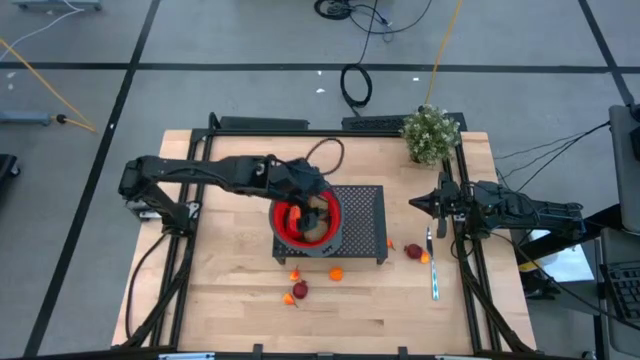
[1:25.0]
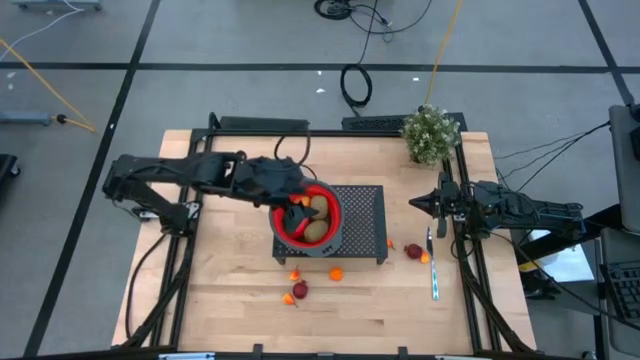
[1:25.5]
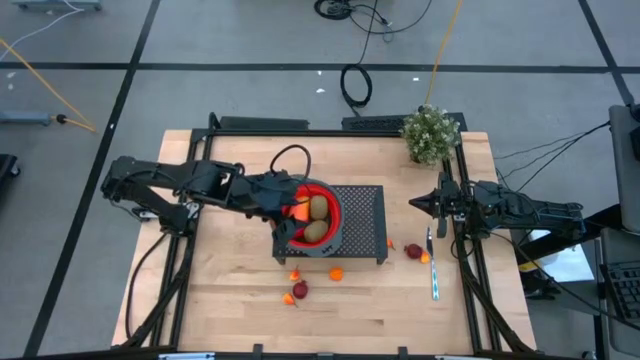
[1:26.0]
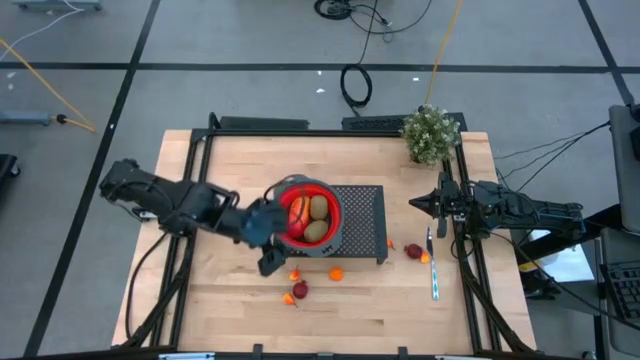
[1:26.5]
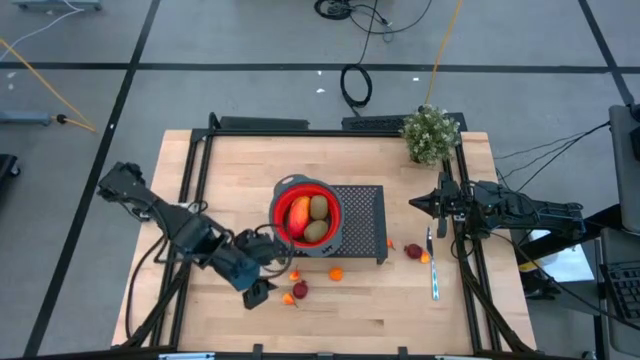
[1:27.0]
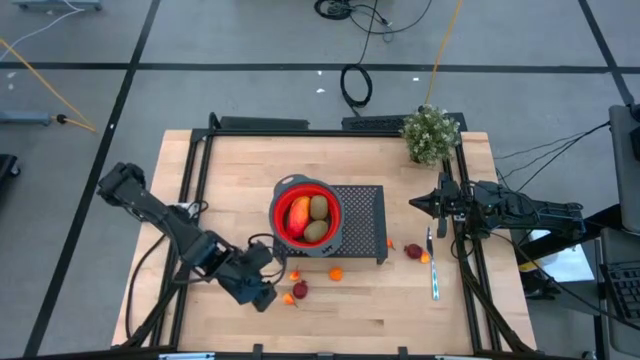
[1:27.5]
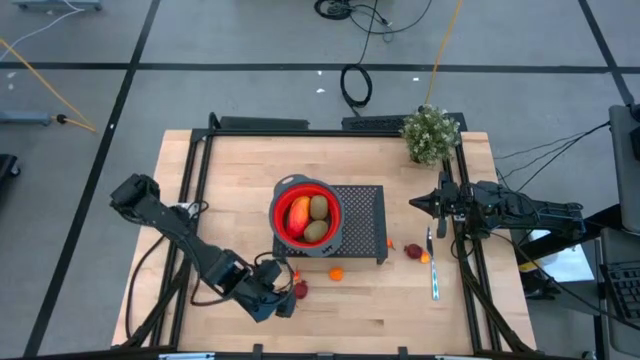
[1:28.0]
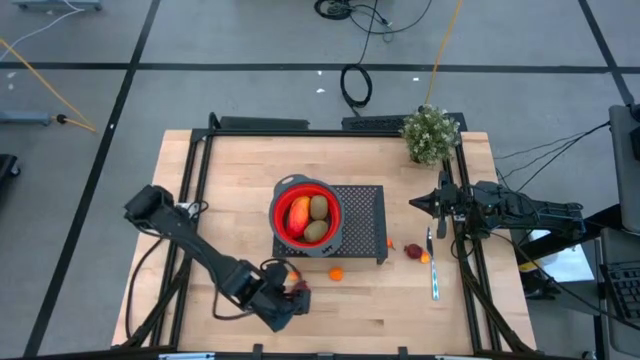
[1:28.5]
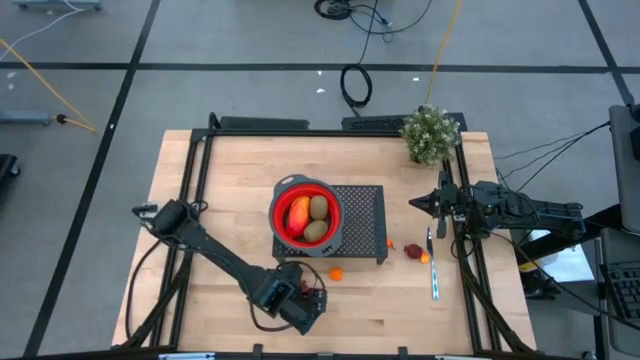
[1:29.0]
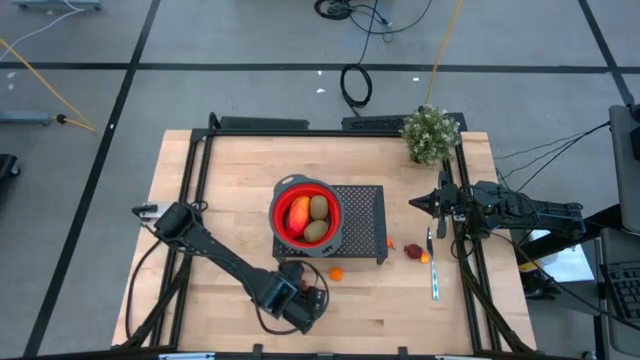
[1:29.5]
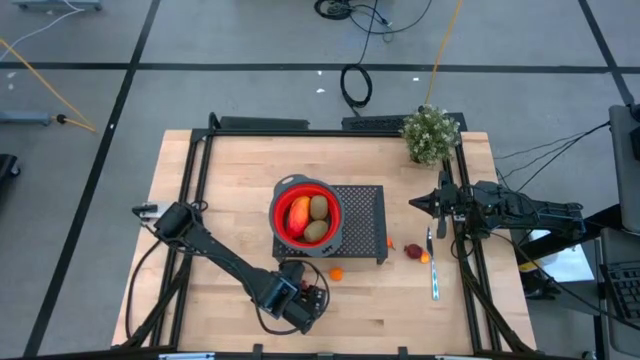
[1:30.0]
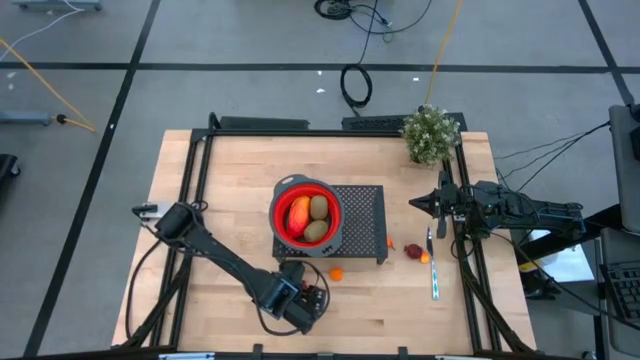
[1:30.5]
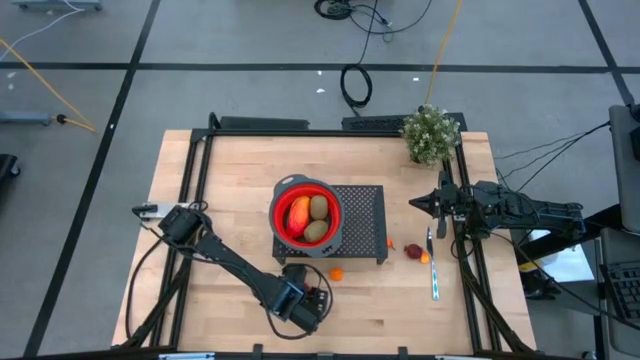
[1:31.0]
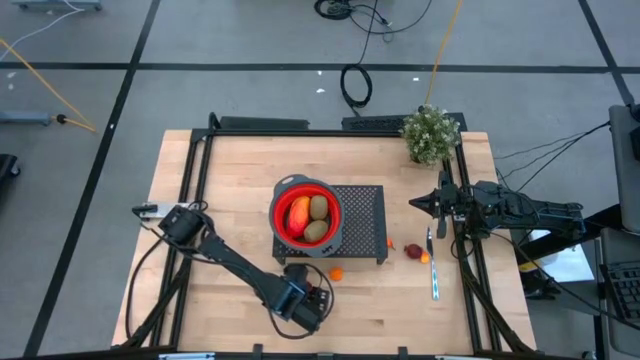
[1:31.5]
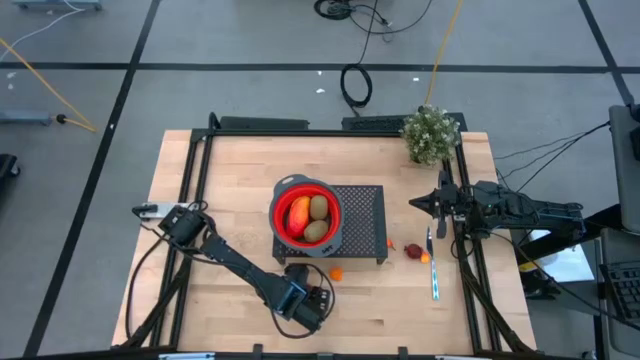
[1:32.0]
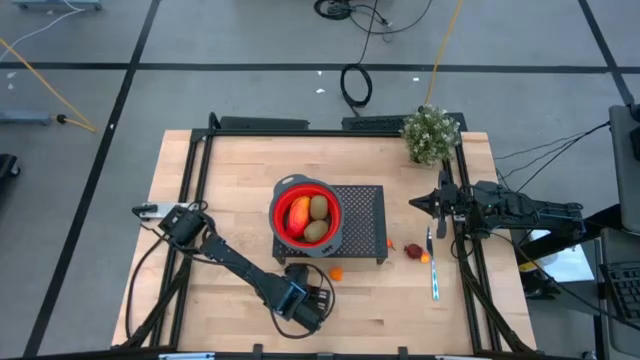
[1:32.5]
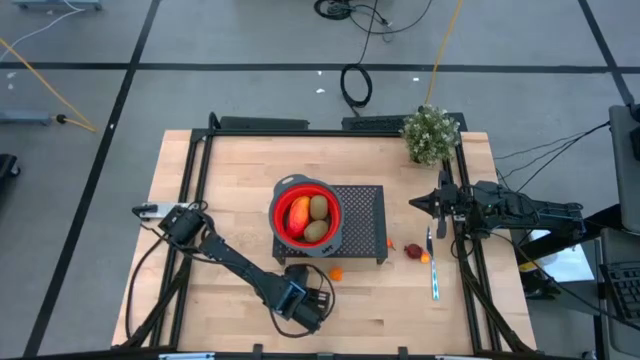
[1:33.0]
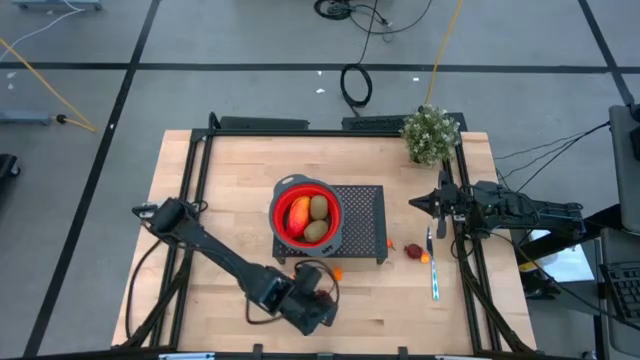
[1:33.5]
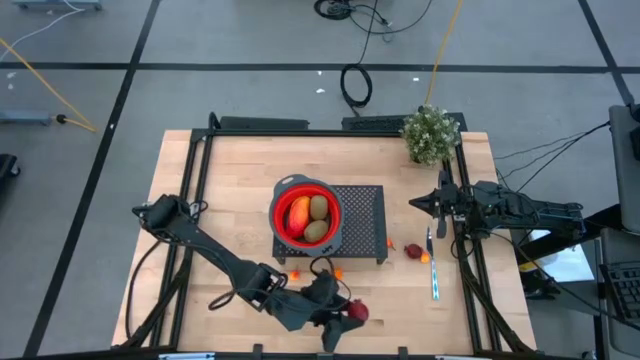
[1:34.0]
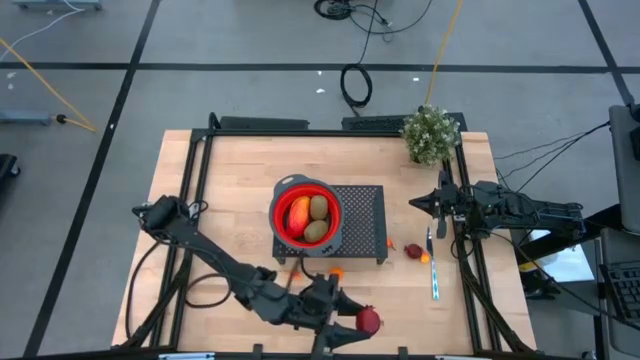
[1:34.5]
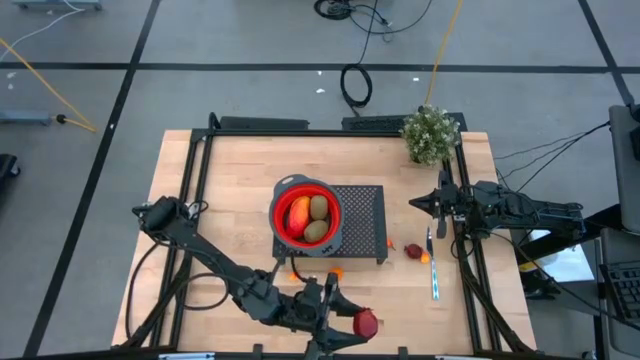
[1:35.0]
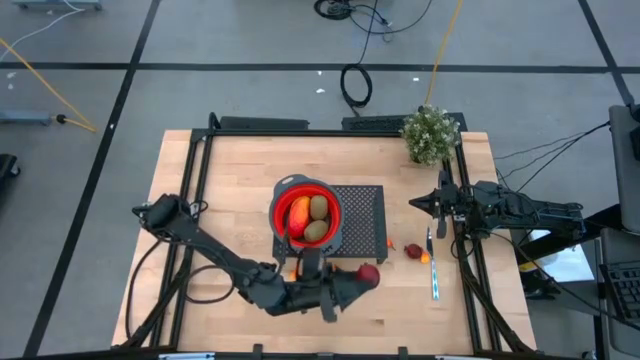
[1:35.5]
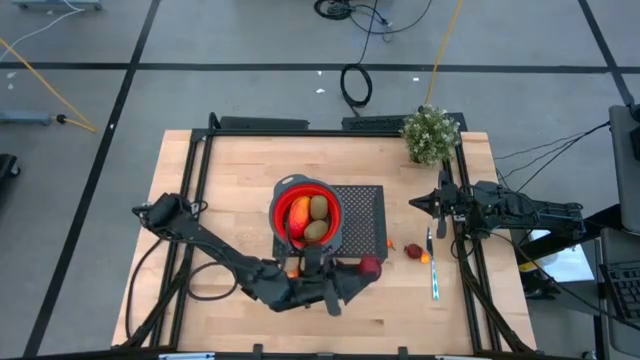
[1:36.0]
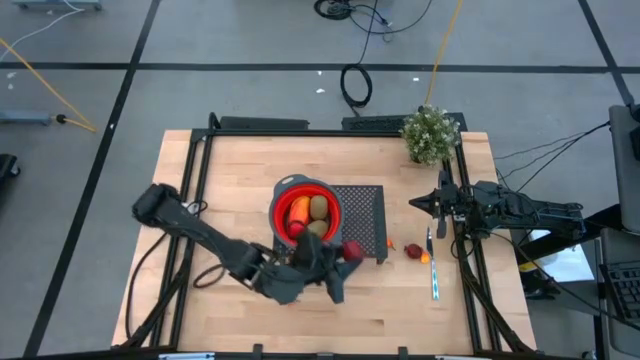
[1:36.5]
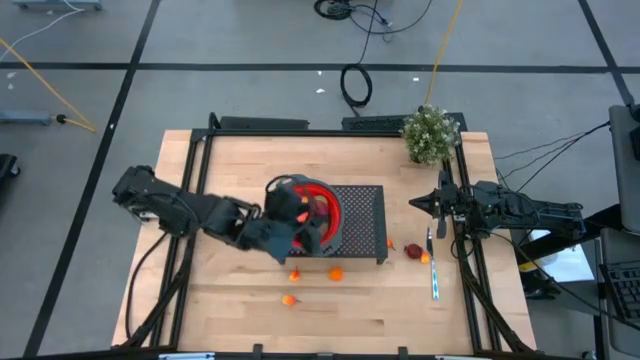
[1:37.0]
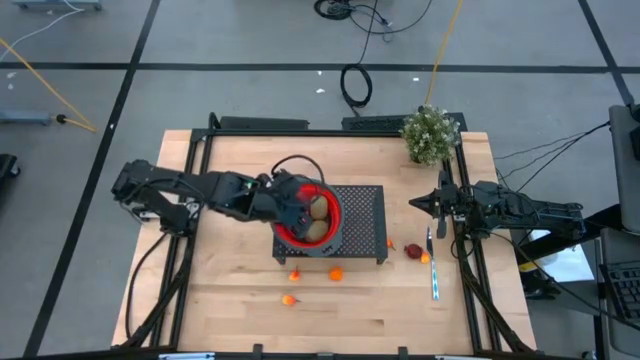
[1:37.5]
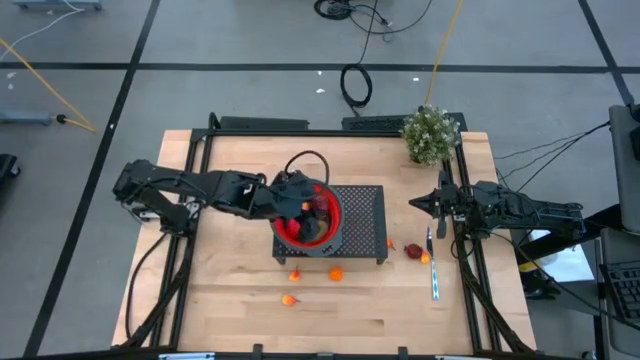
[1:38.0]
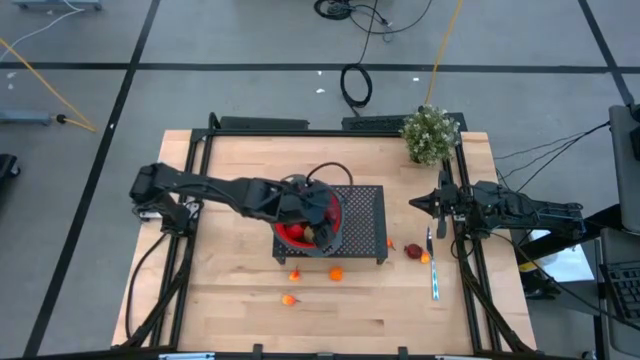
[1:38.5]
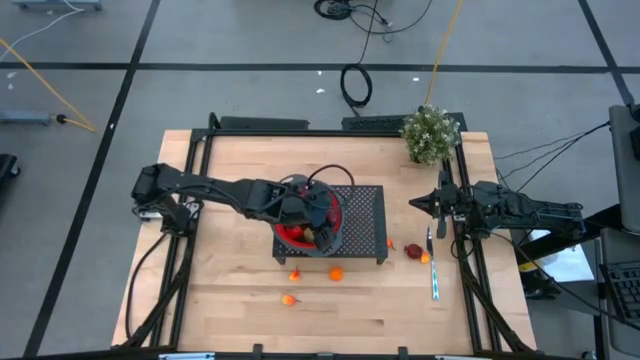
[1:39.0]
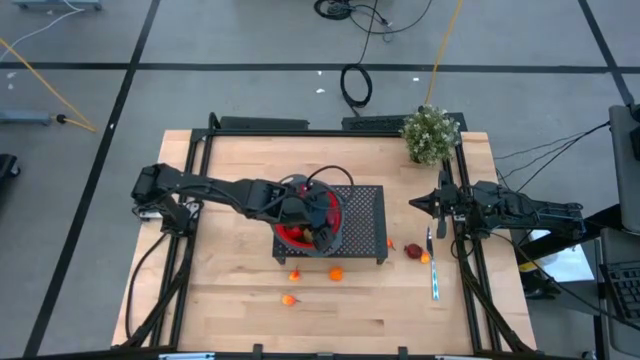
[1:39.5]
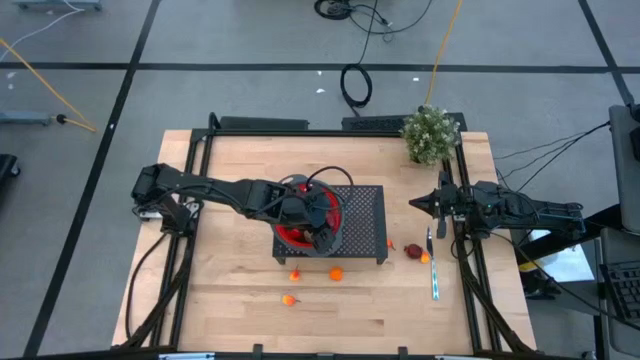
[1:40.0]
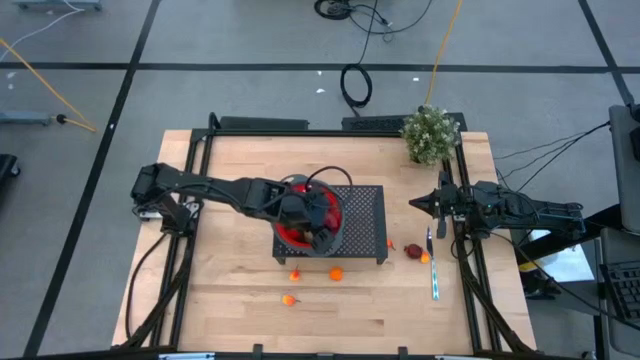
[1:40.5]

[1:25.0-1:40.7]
Task: Pick & Place Fruit
Put the pomegranate into the red colander on the shelf

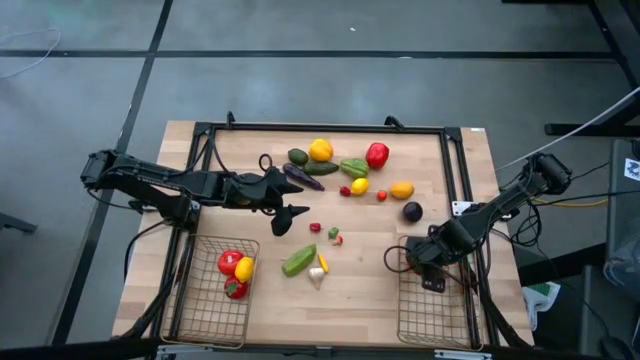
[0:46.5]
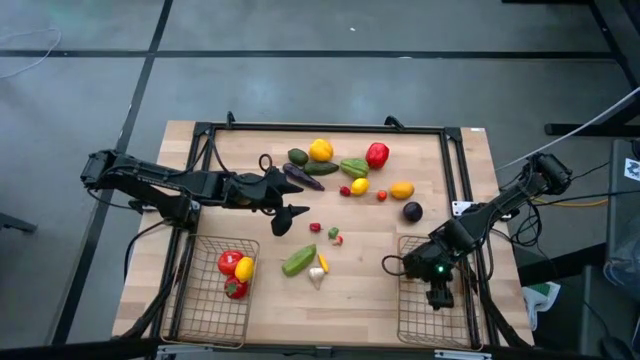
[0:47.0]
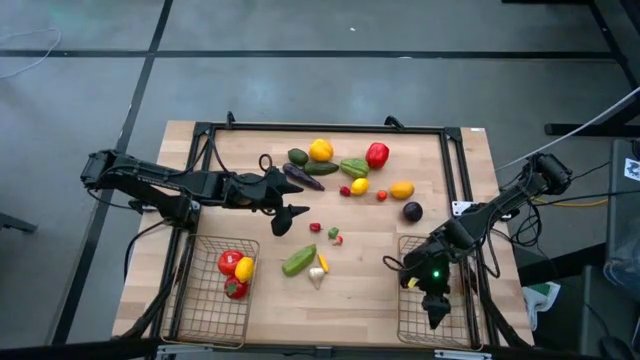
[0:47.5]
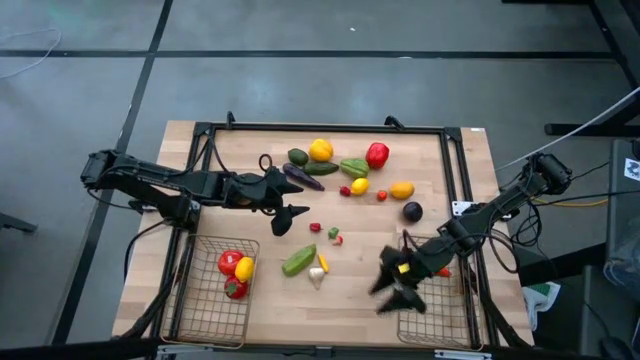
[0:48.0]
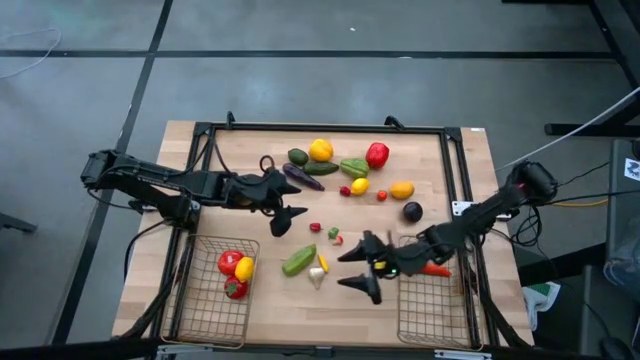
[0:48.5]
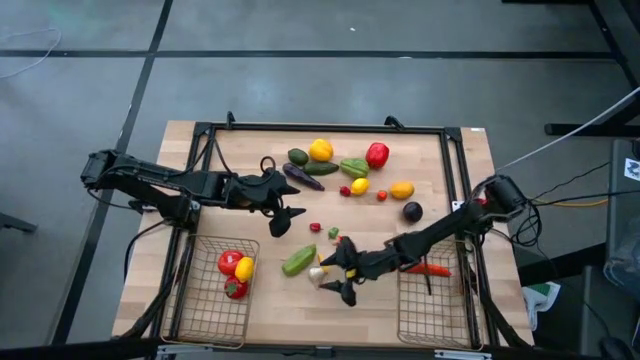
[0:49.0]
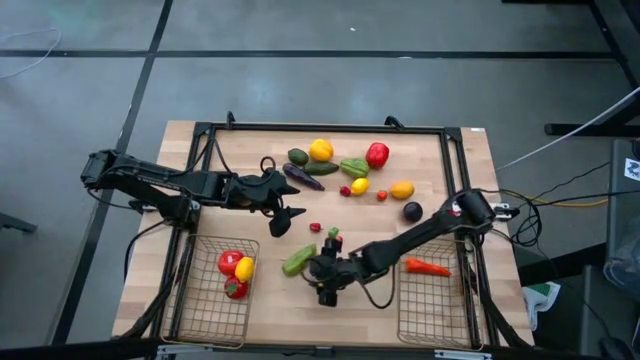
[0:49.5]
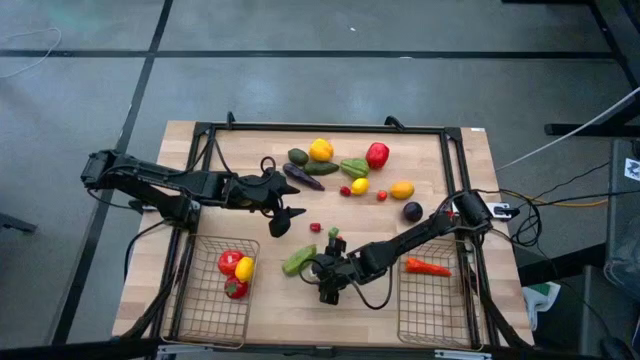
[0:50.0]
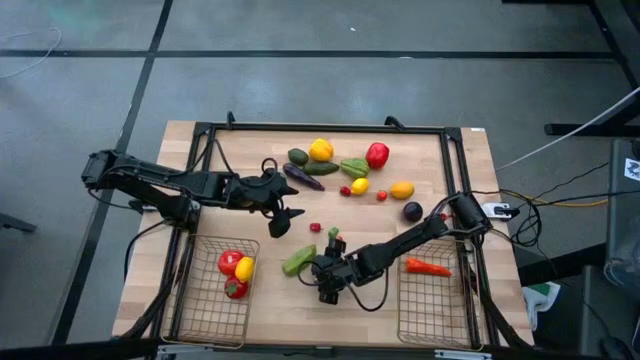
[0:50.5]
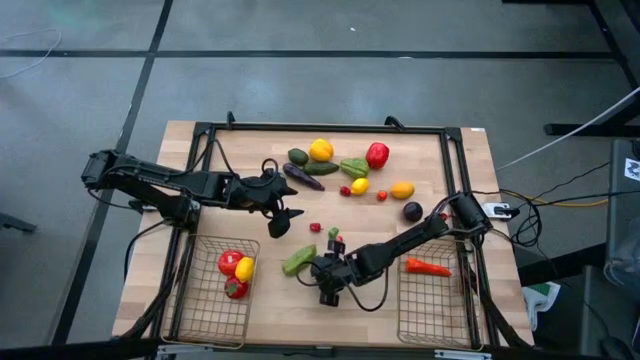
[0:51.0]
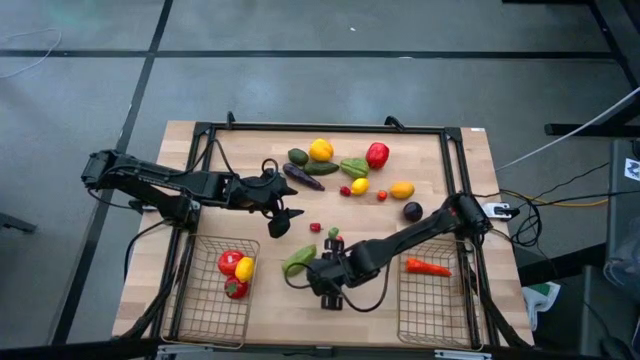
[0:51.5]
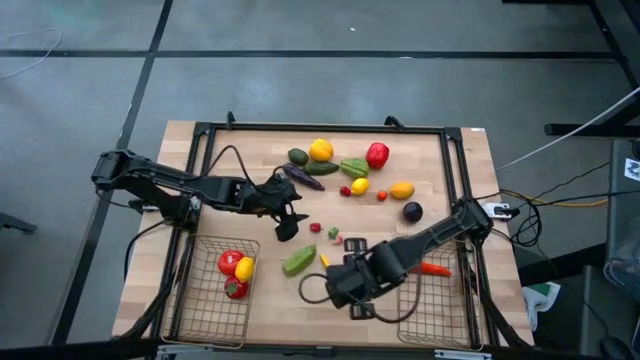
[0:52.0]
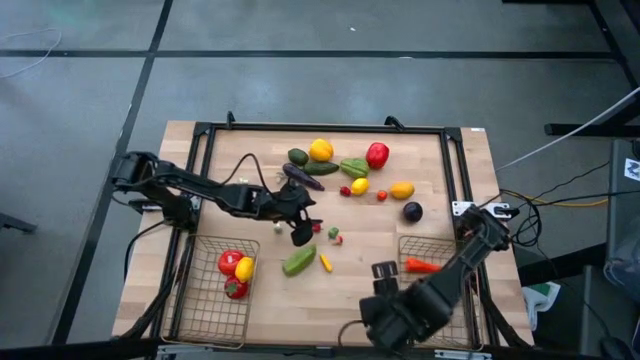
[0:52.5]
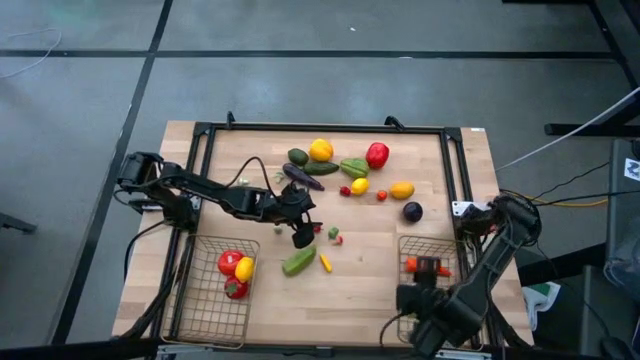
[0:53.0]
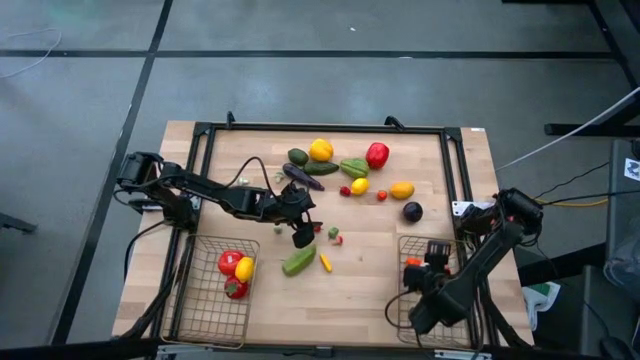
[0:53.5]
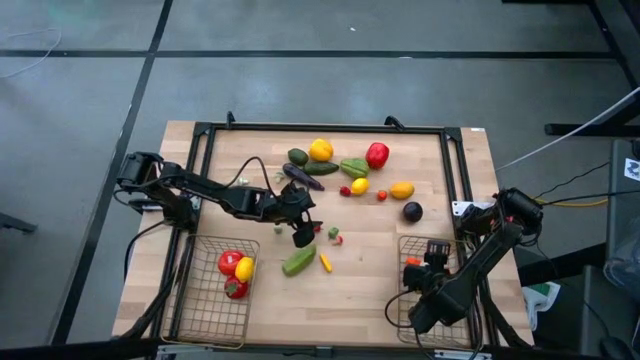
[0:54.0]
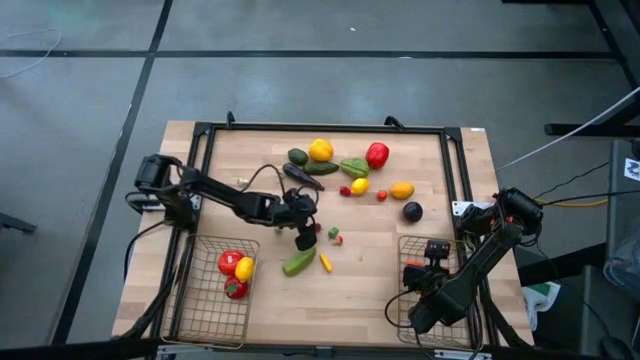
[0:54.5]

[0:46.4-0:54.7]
Task: Sort produce into baskets
Put the white garlic into the right wire basket
